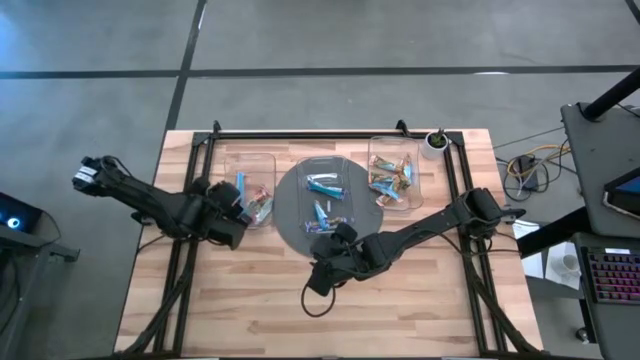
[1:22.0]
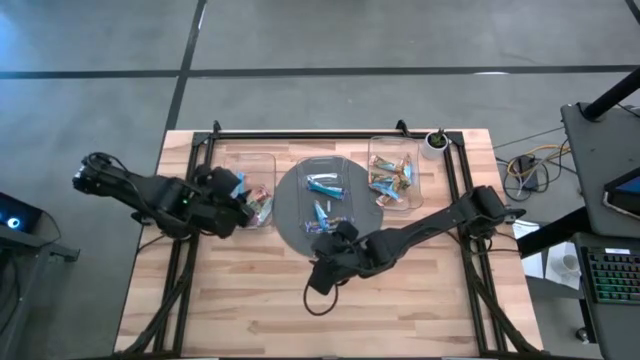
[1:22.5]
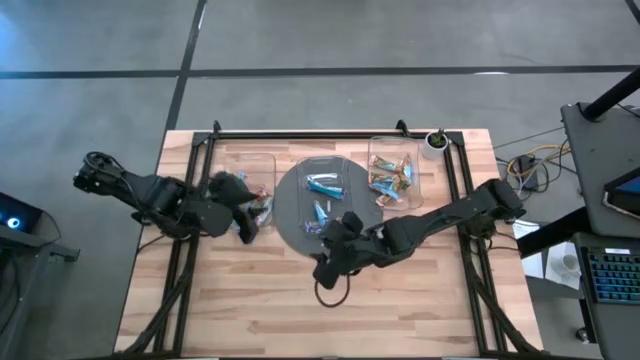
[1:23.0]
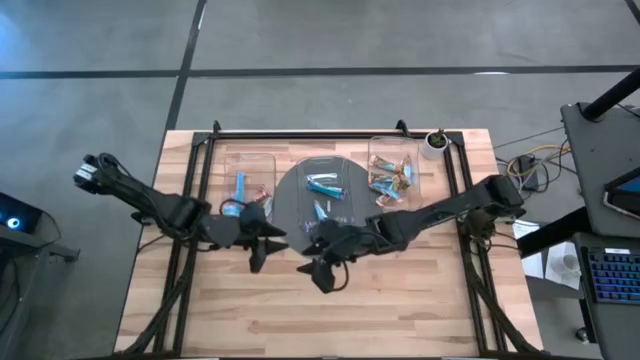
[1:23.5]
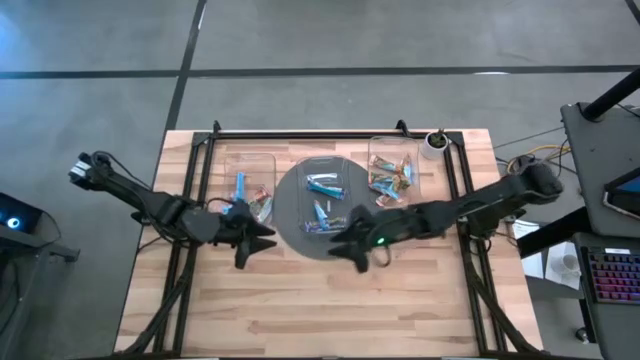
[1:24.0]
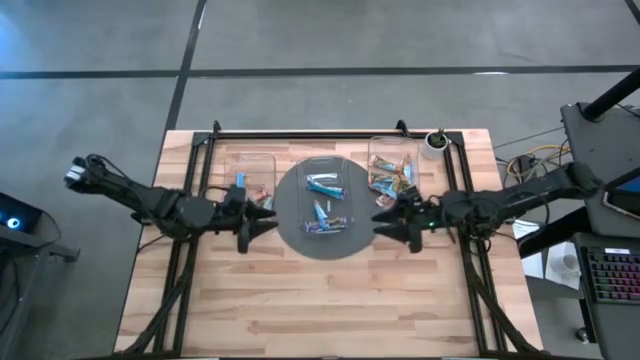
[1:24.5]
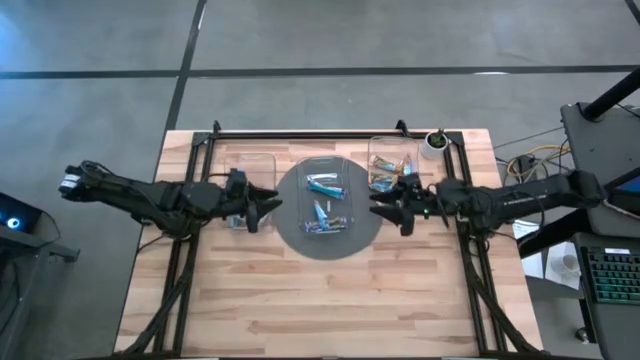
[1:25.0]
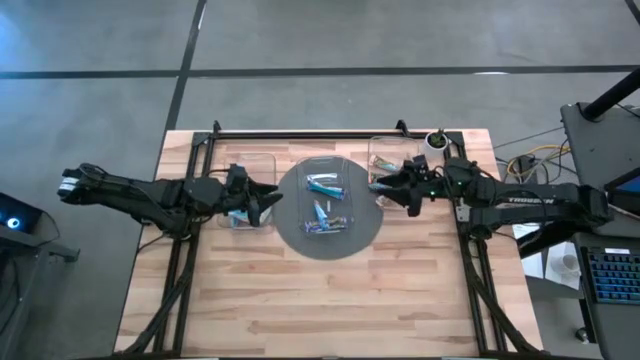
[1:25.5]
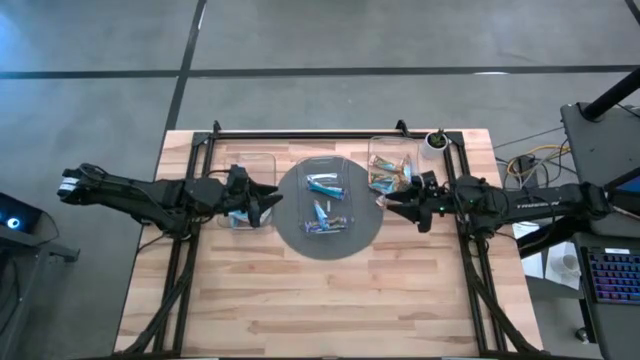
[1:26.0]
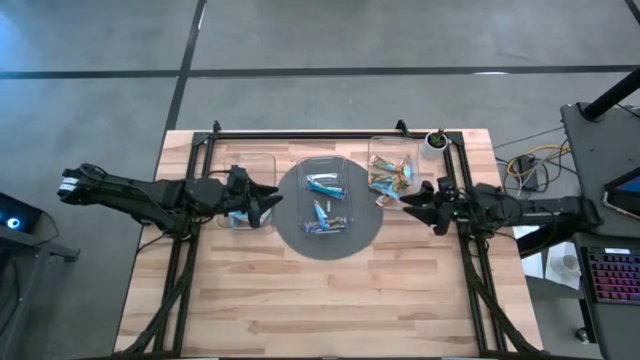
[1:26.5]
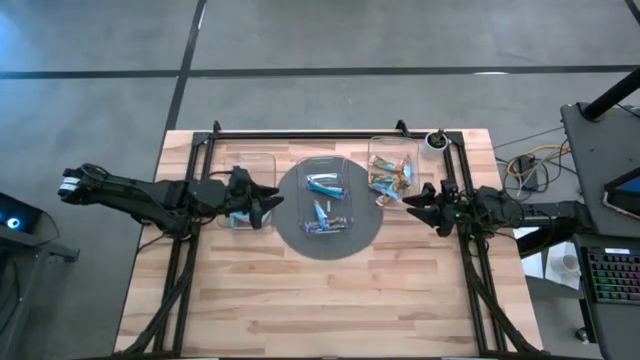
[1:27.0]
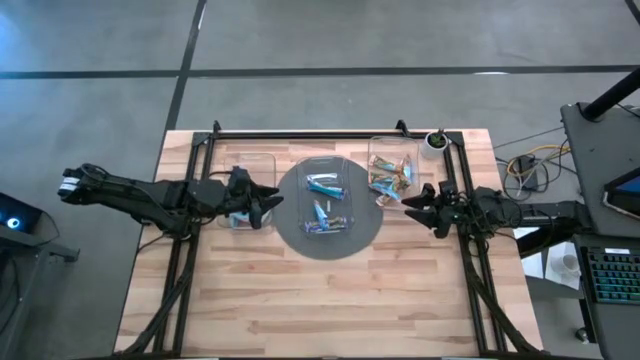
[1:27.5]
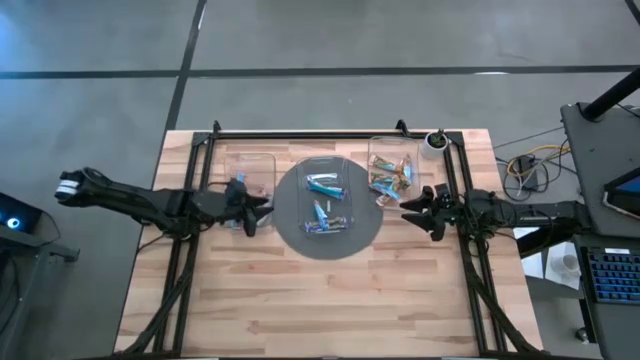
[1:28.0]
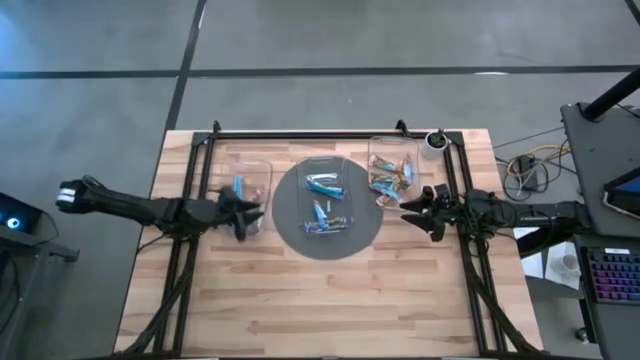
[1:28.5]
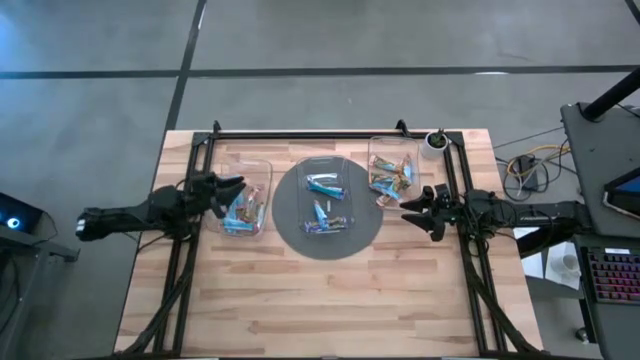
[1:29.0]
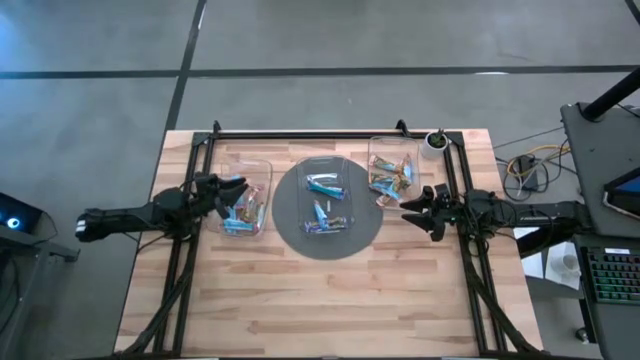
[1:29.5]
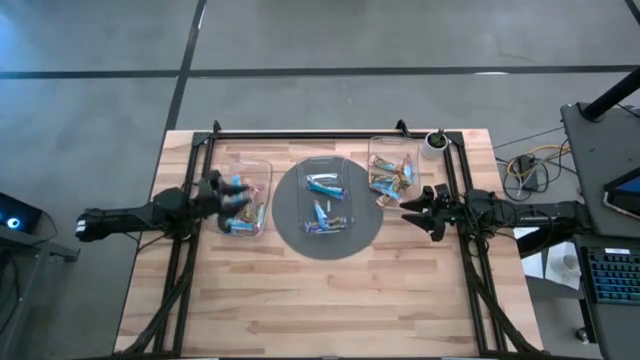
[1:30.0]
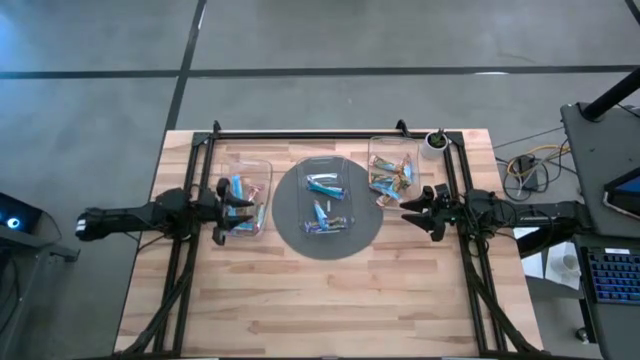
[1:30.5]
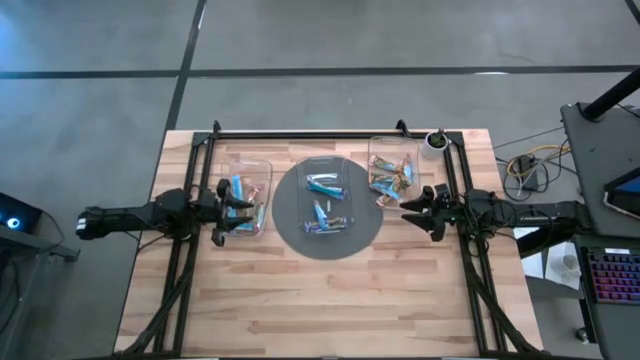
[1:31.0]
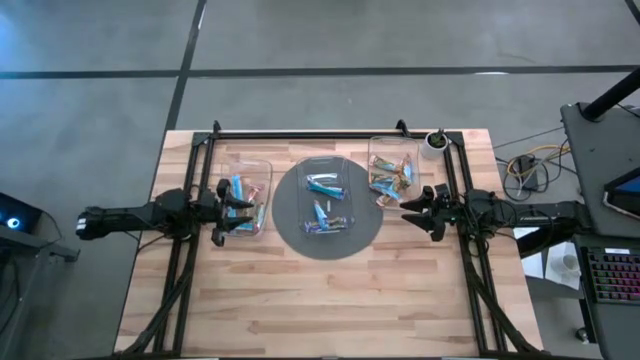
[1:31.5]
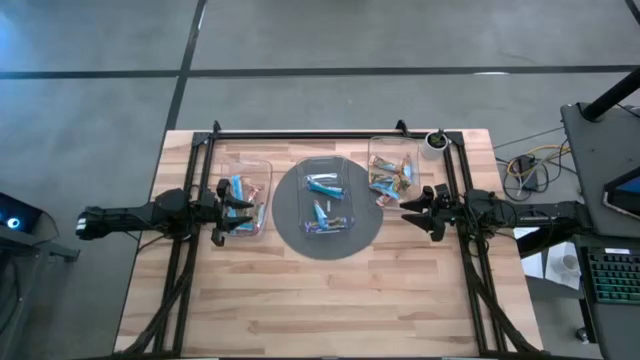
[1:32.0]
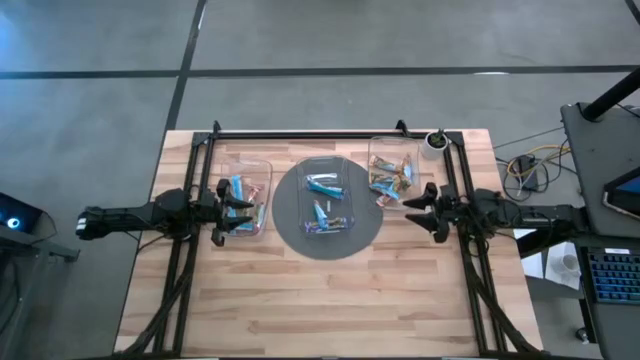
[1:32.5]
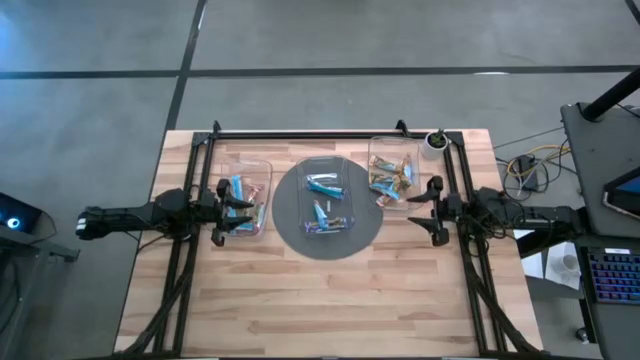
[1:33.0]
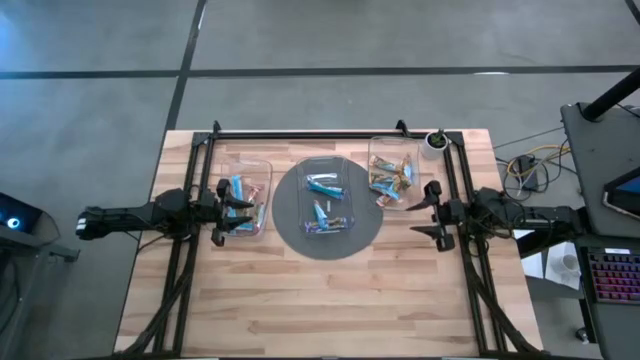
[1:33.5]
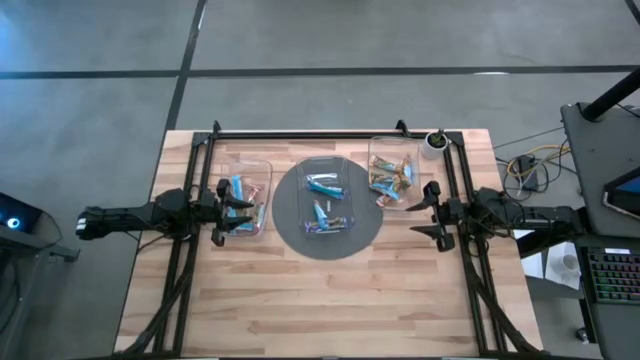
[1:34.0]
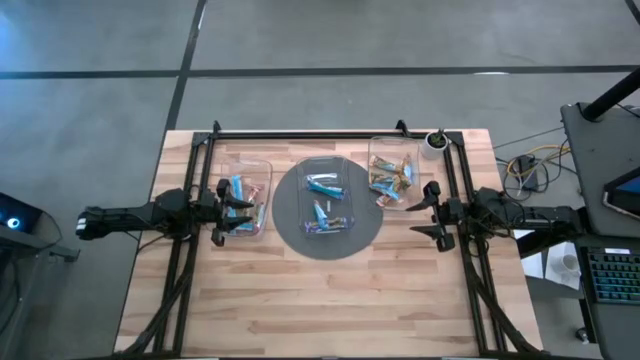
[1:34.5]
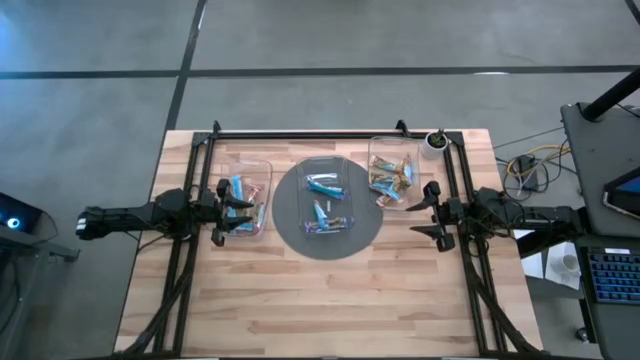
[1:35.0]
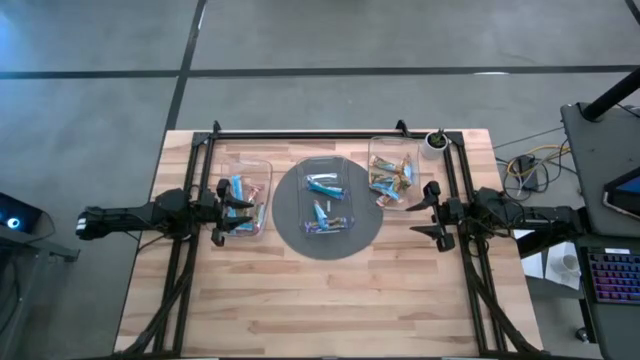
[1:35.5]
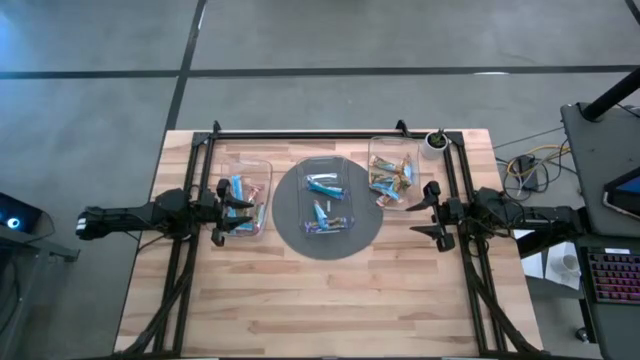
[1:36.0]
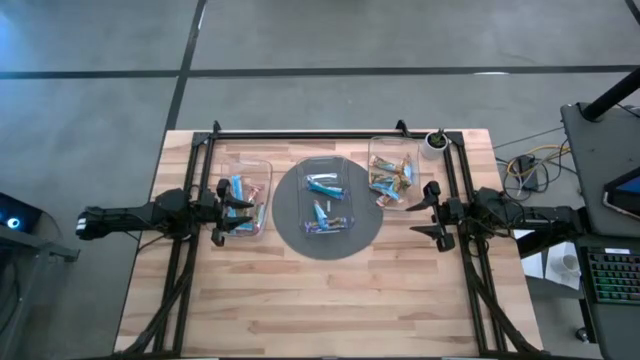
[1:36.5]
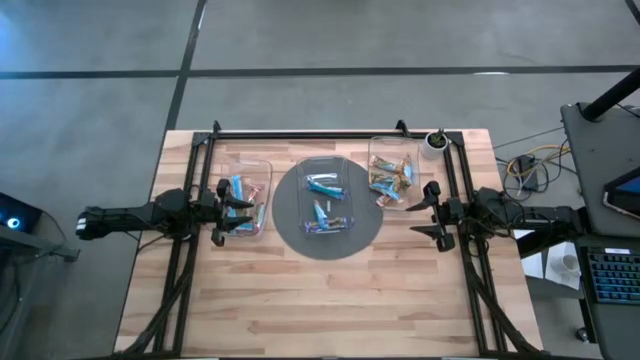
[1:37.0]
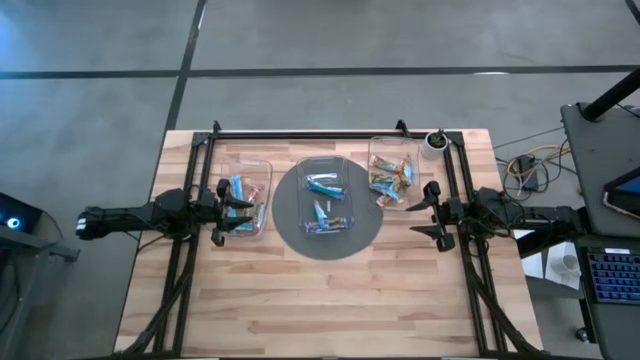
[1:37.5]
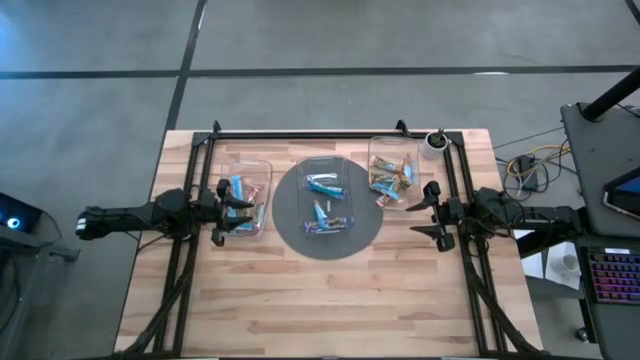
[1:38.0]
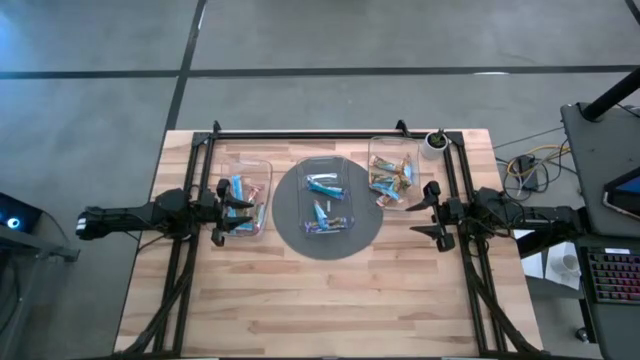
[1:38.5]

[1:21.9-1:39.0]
Task: Pick and place Granola Bars by type
Return to Home Position

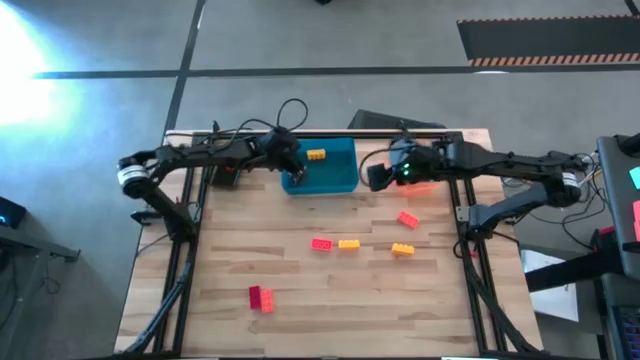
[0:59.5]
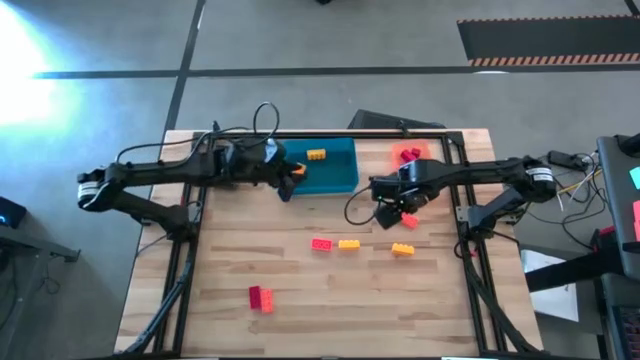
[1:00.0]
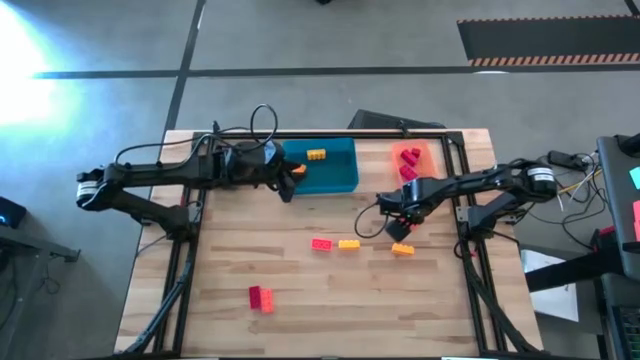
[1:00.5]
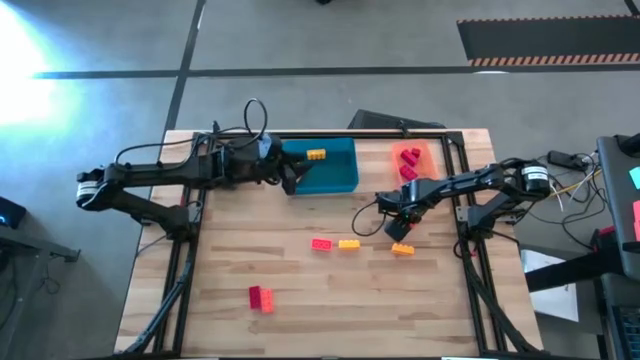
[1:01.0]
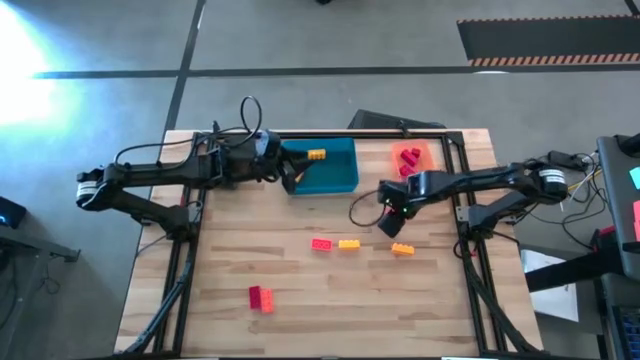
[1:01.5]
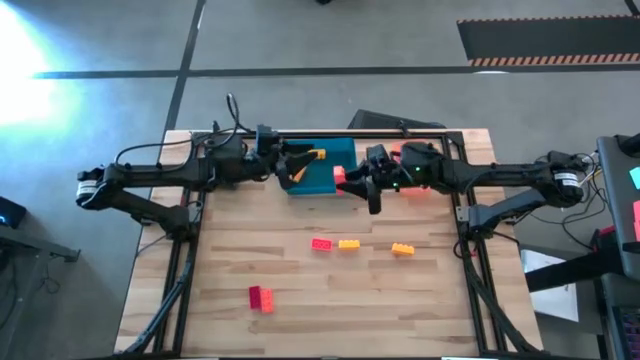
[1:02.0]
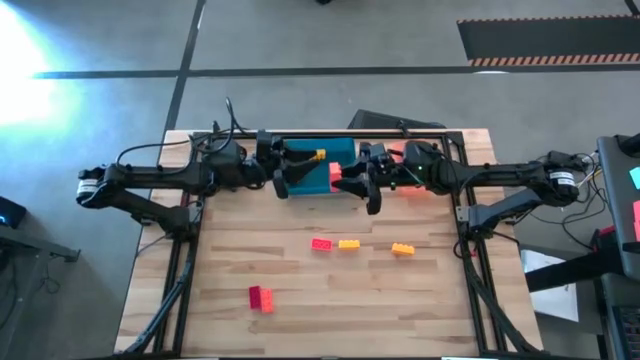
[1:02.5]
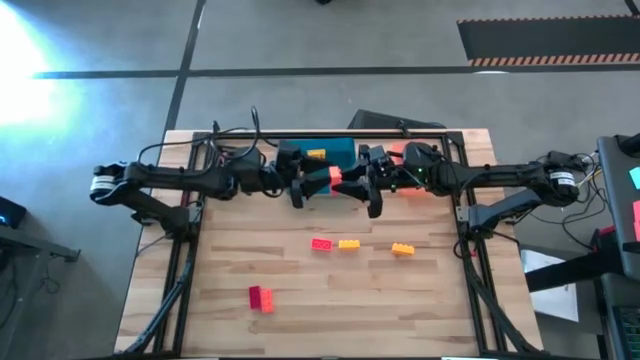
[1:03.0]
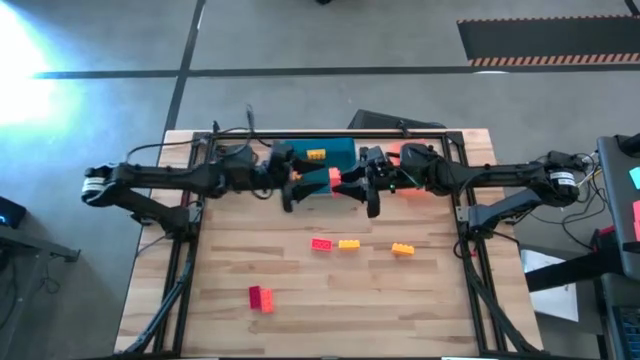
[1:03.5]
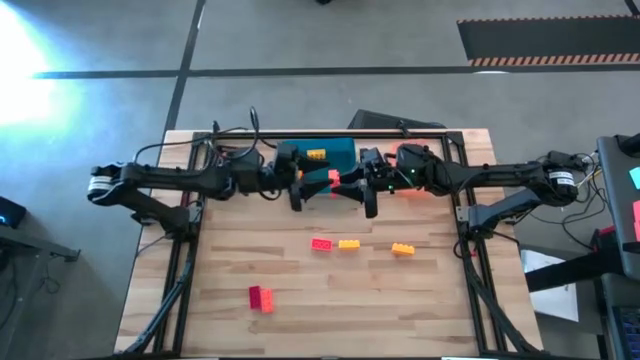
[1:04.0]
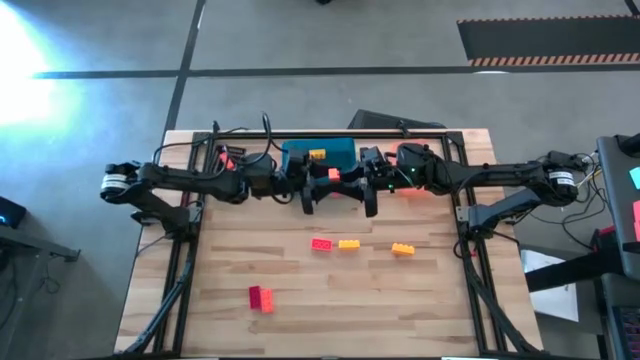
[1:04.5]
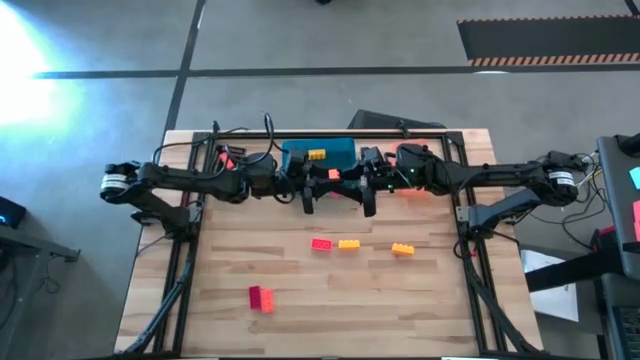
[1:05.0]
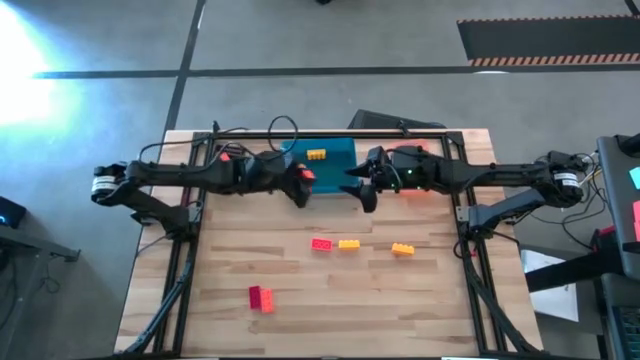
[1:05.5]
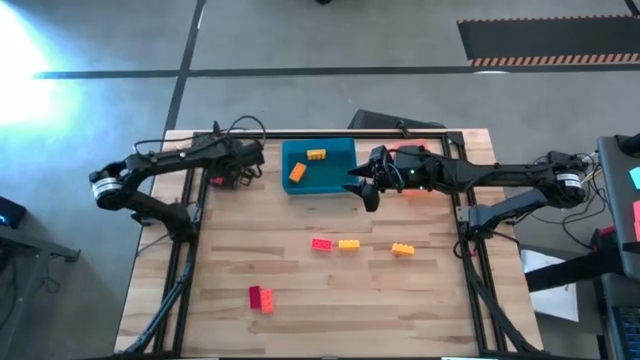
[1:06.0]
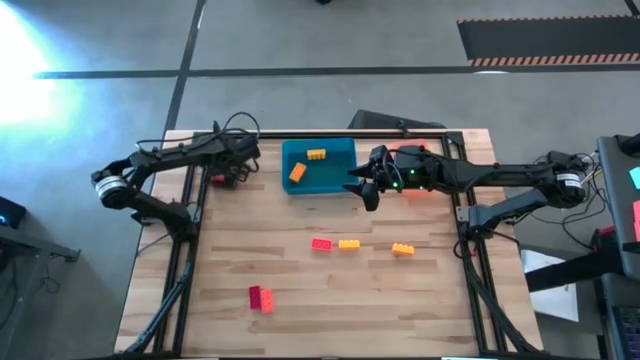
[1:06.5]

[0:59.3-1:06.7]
Task: Sort & place blocks by color
Put the orange game piece into the black bin
